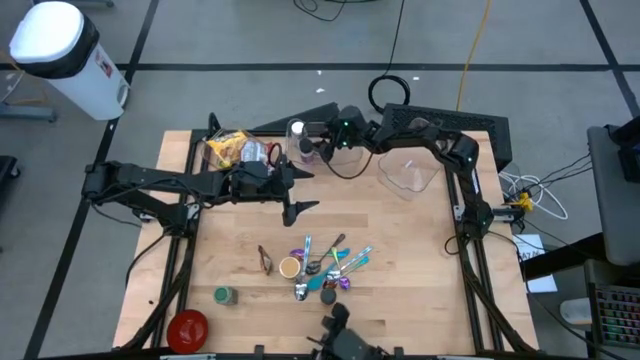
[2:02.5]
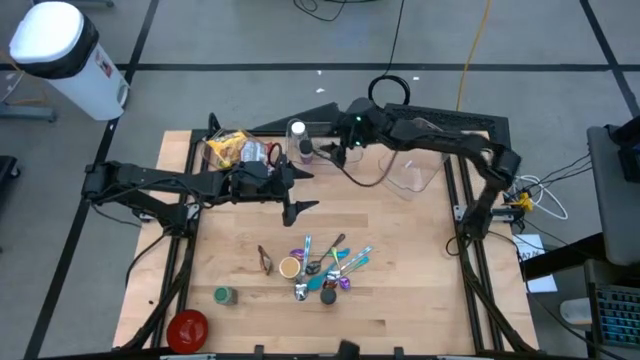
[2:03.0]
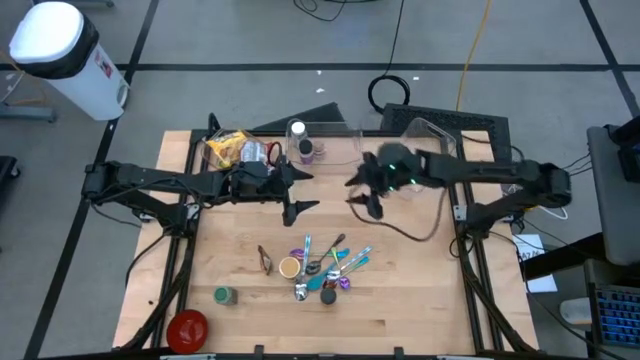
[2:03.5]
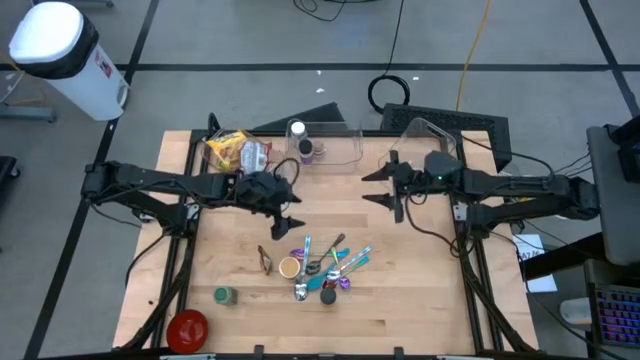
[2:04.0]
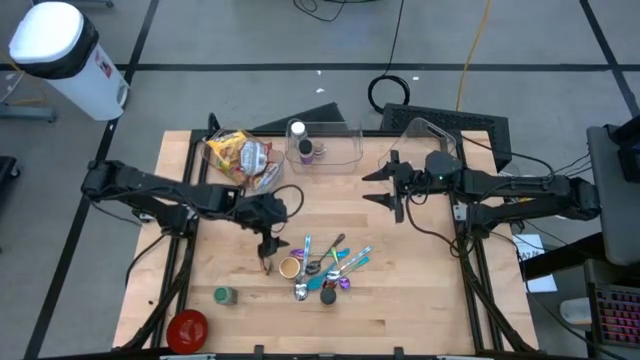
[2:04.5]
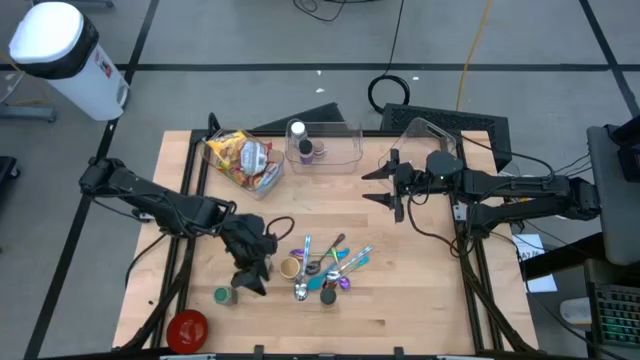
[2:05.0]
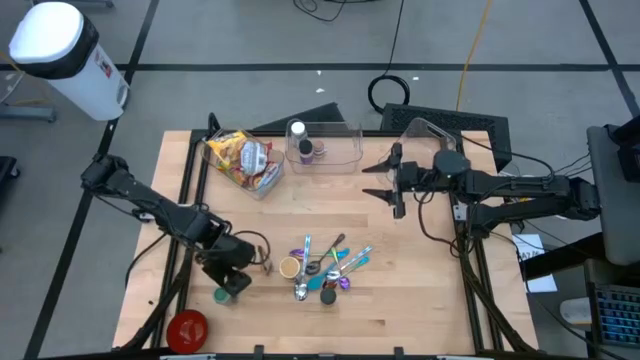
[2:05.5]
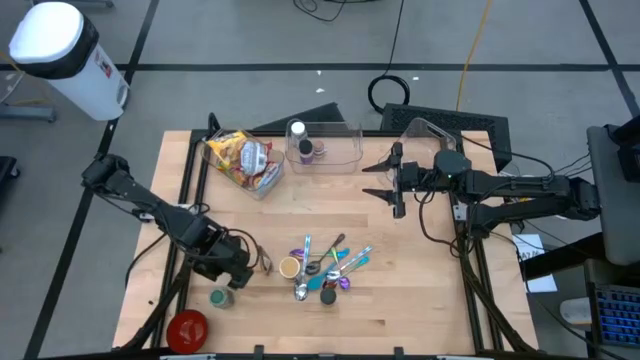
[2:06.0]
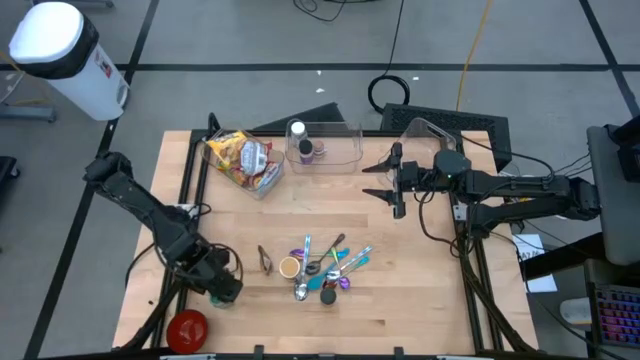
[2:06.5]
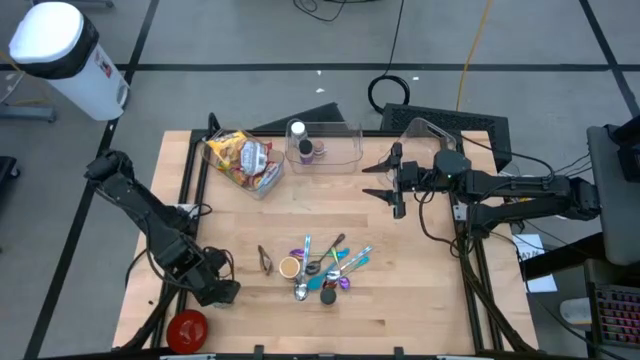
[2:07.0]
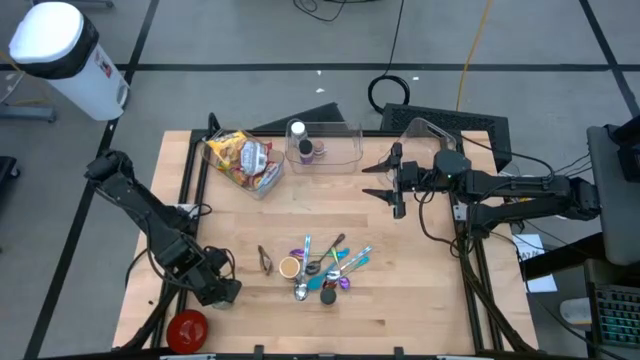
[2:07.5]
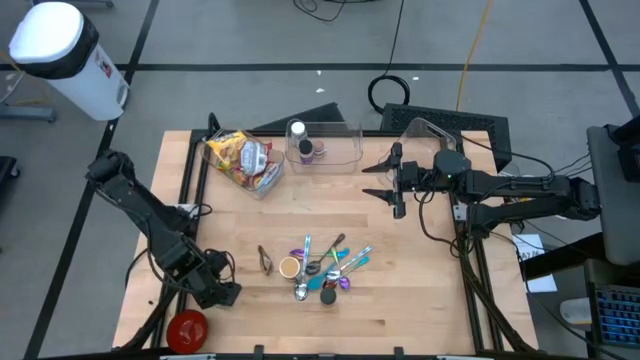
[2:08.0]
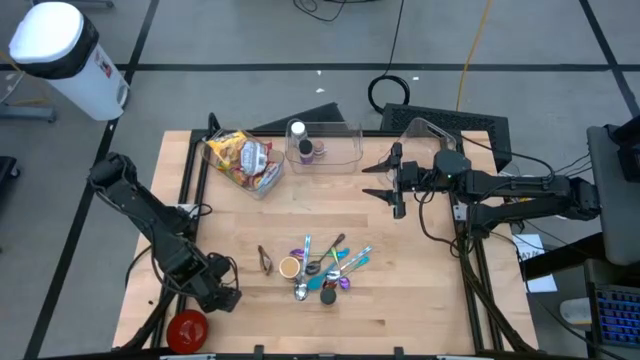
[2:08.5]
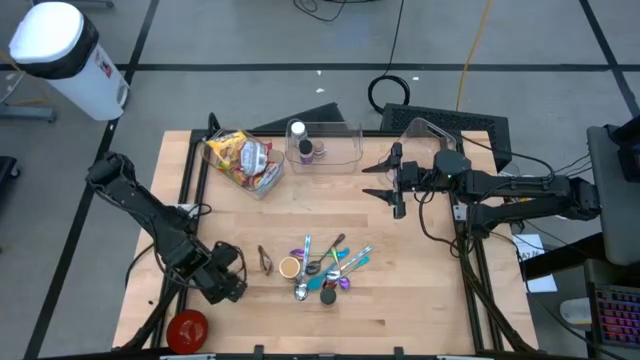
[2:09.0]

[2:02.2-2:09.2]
Task: Pick & Place Food Item
Put the green seasoning bottle into the middle transparent bin

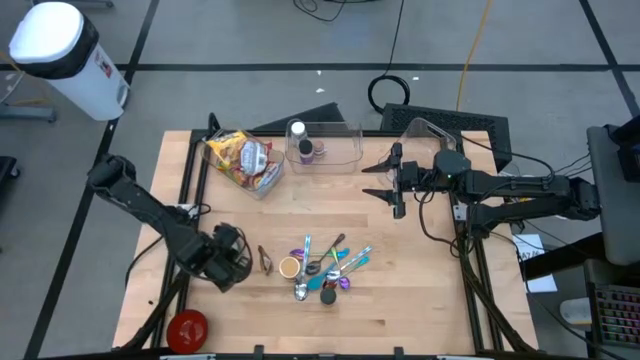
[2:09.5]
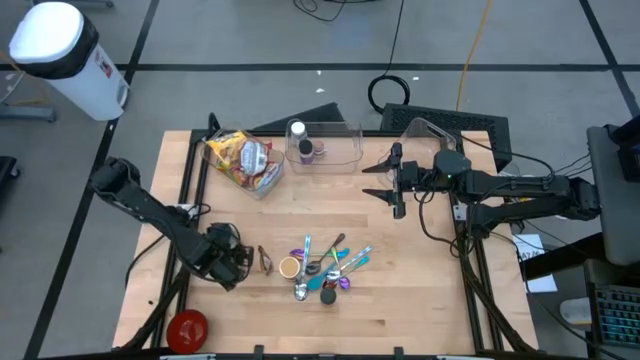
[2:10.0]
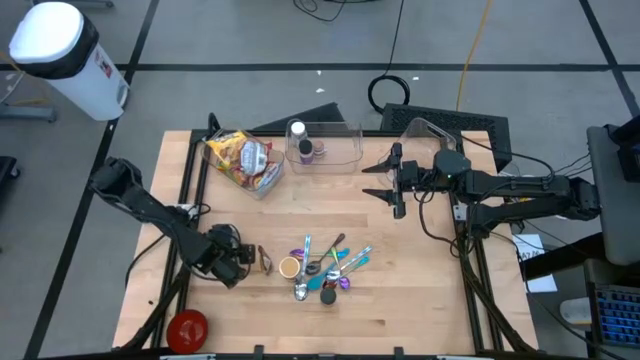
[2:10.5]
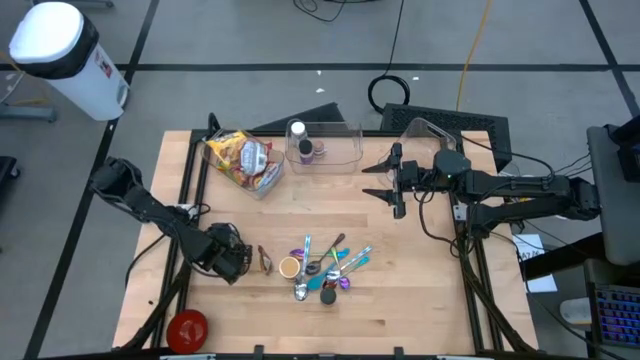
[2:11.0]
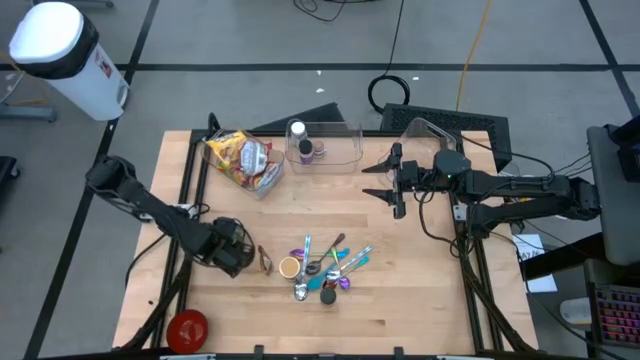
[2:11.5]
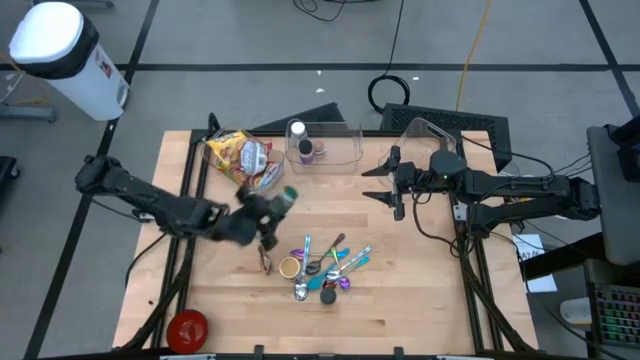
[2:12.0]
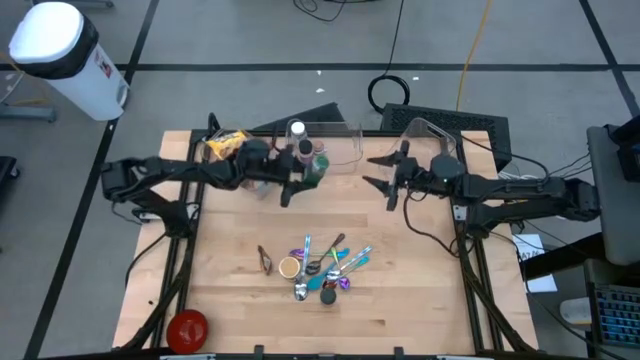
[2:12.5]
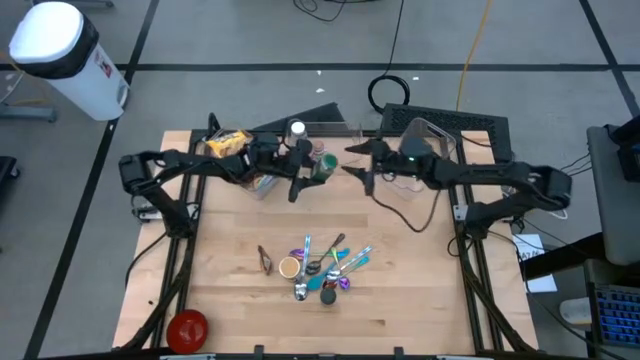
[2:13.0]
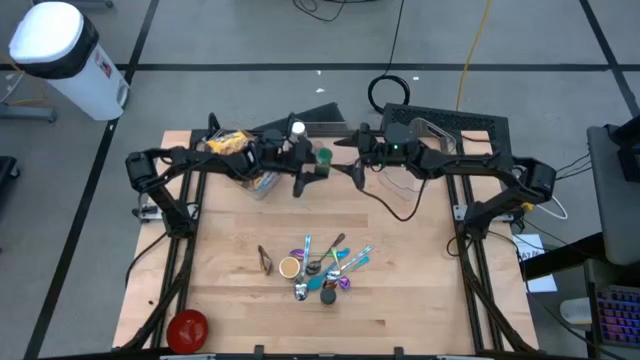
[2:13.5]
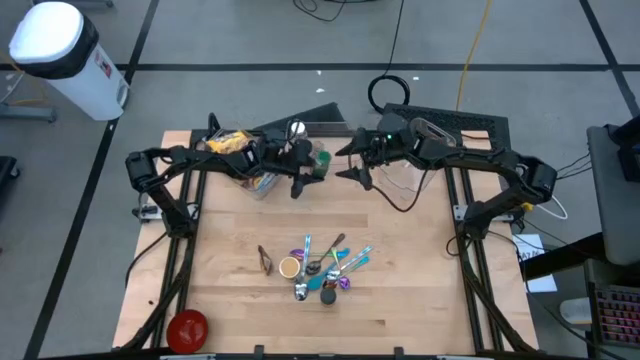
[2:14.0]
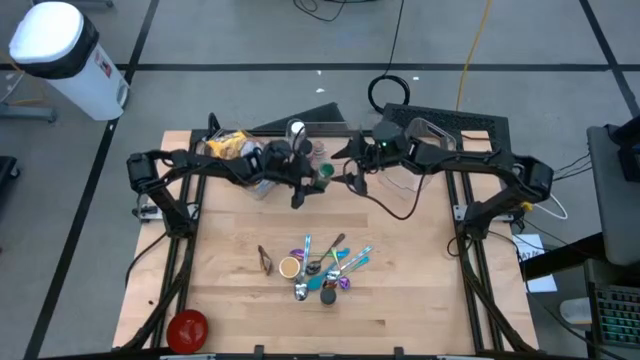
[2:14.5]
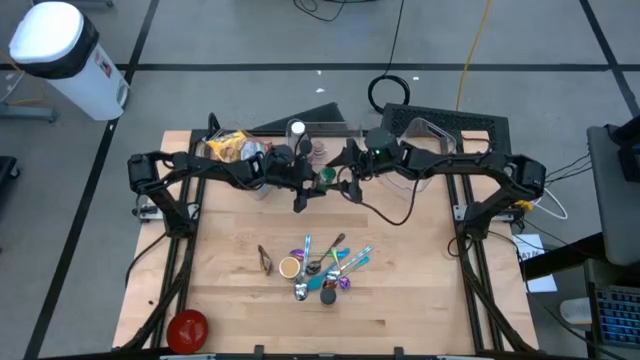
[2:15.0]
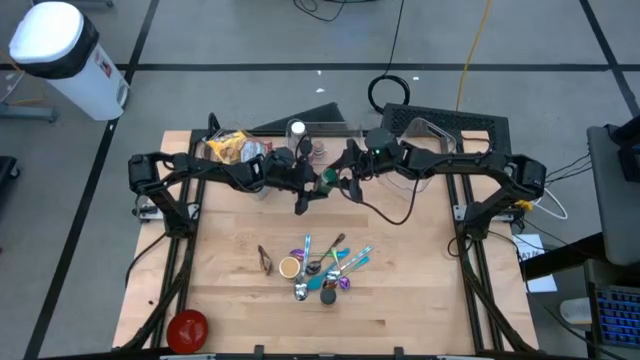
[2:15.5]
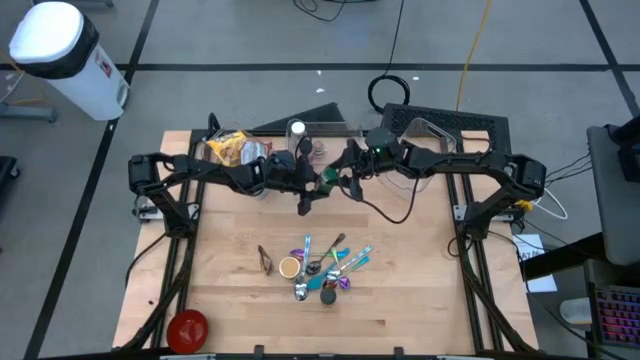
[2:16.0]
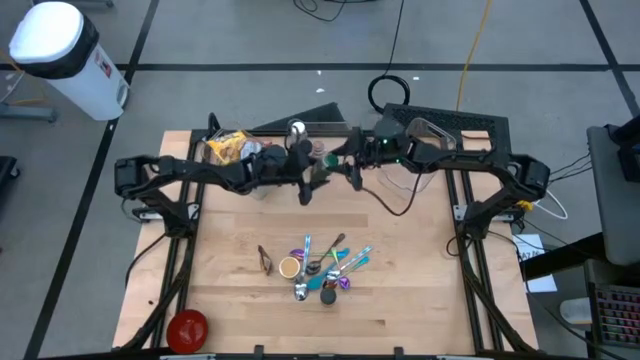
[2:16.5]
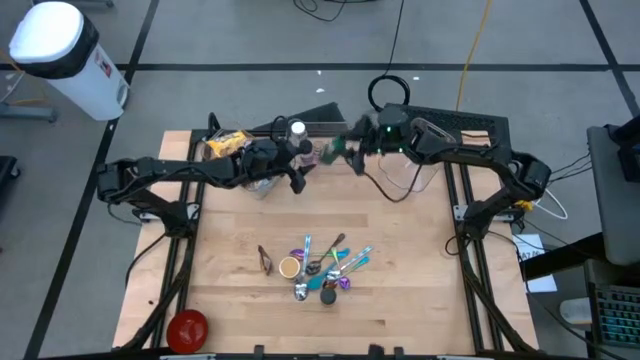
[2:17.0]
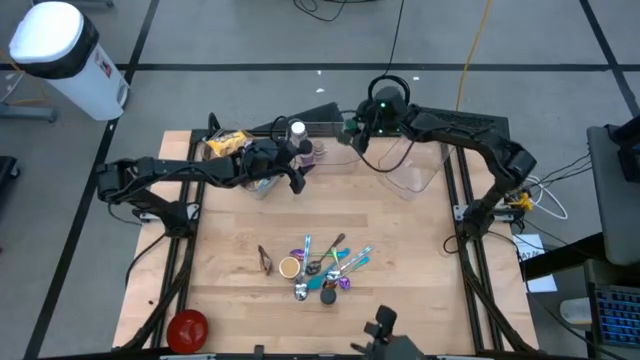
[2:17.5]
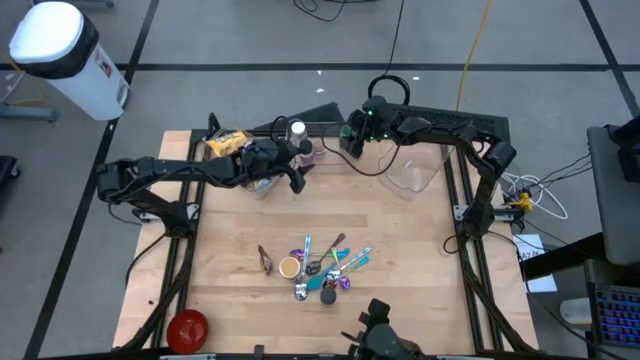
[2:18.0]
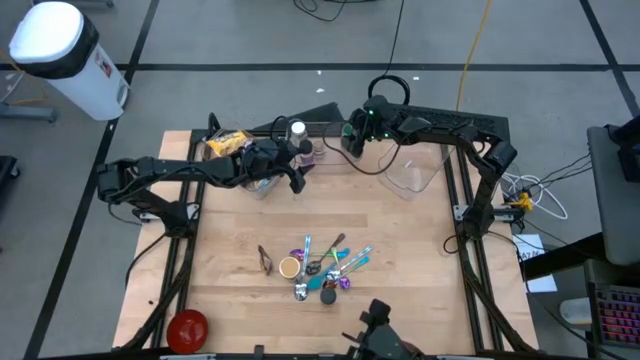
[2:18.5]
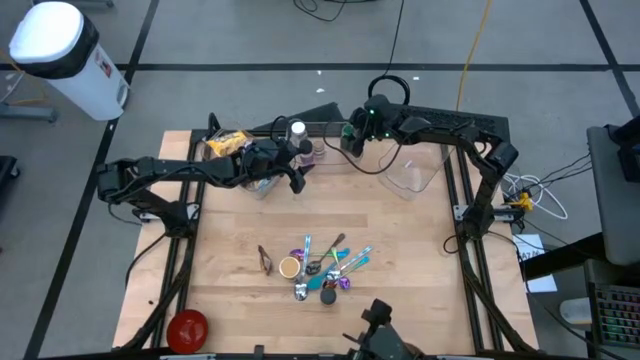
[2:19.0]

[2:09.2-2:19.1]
Put the green seasoning bottle into the middle transparent bin

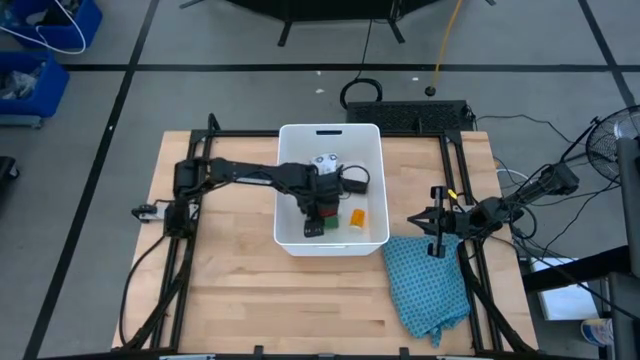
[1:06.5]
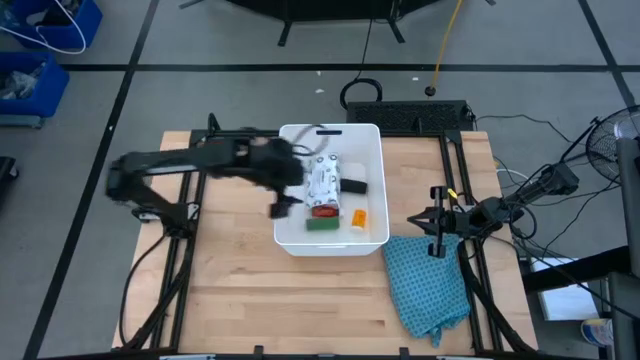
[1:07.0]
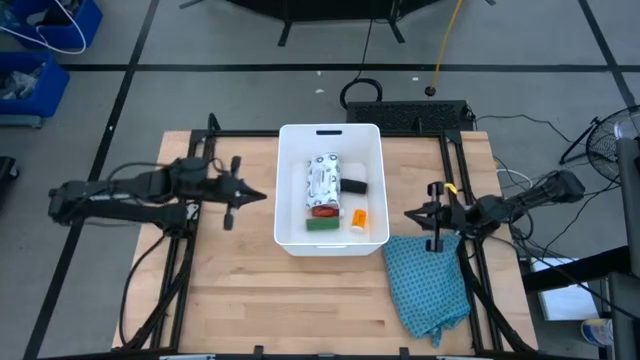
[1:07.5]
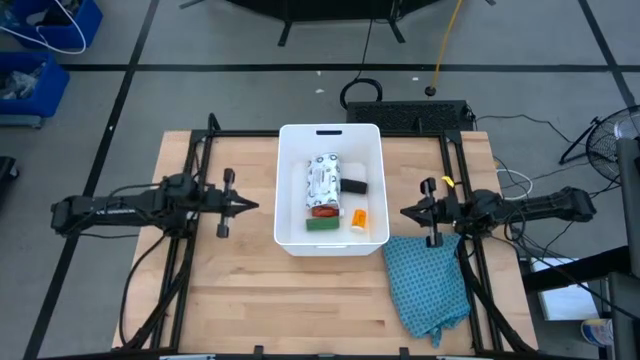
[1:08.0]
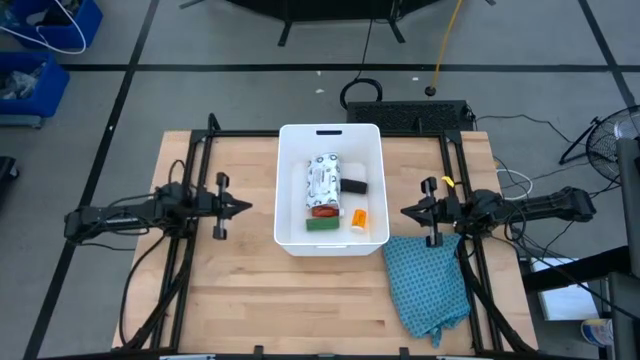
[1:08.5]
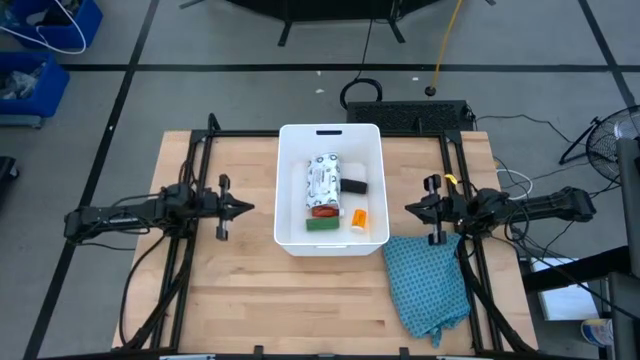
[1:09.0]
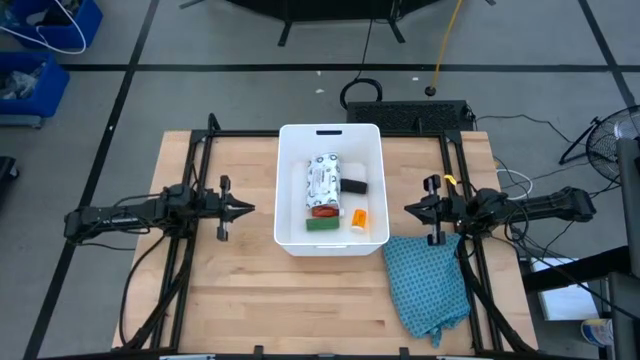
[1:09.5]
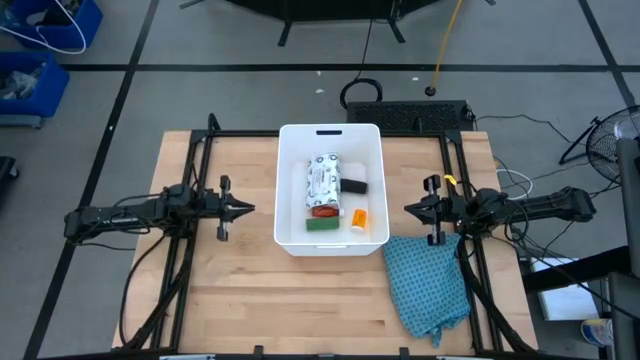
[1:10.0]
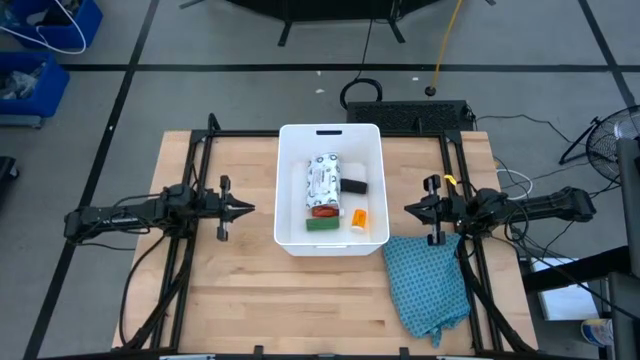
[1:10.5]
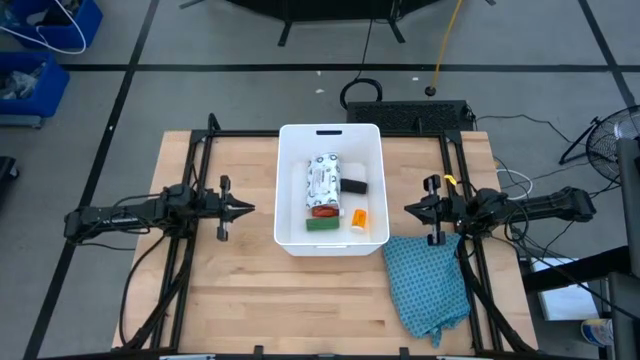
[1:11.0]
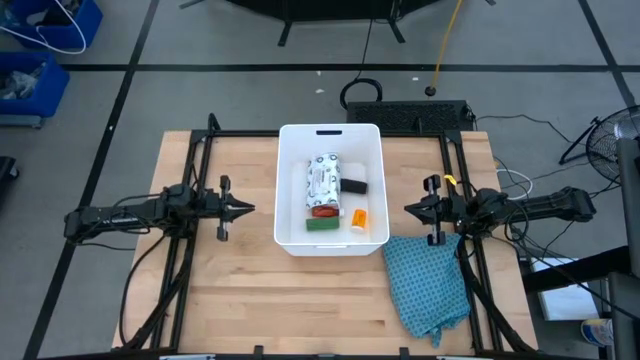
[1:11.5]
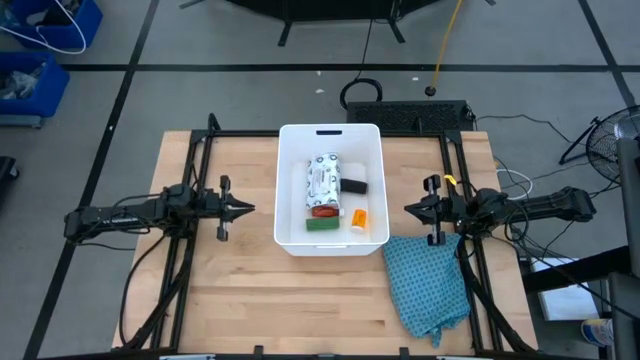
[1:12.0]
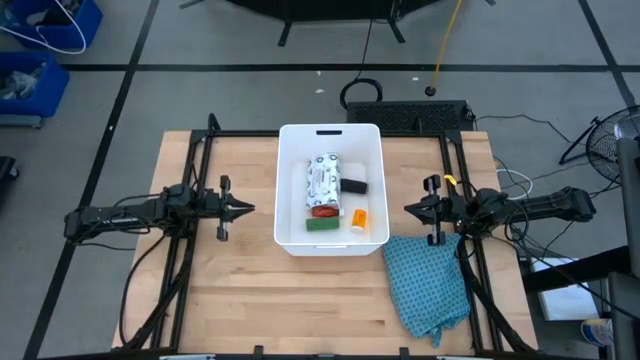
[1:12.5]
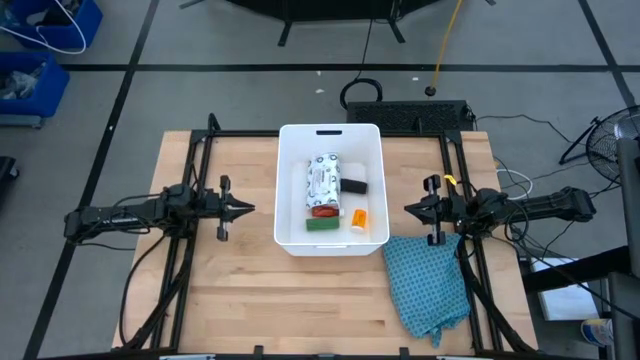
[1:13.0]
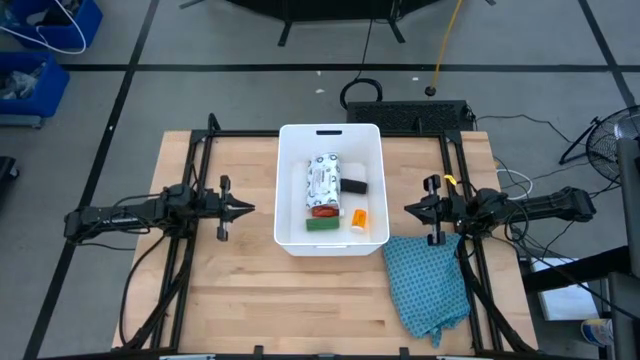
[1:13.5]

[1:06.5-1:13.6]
Task: Pick & place medical supplies in basket/bin
Return to Home Position
